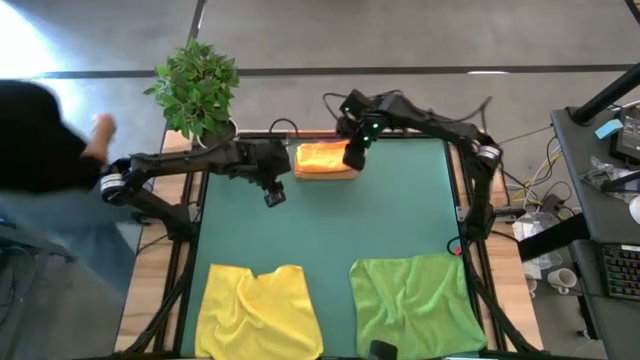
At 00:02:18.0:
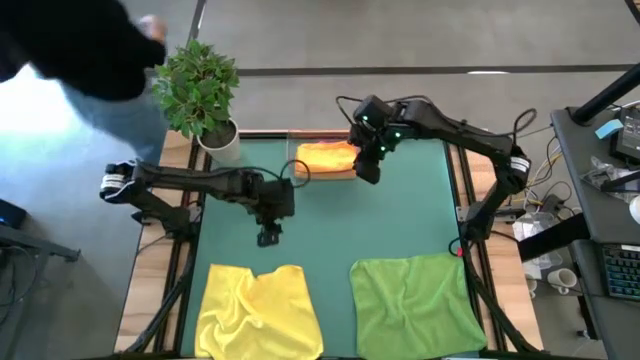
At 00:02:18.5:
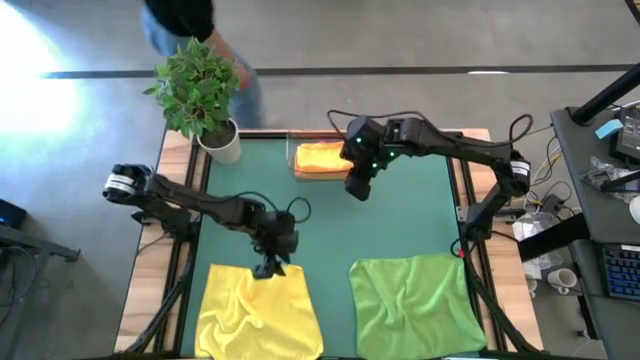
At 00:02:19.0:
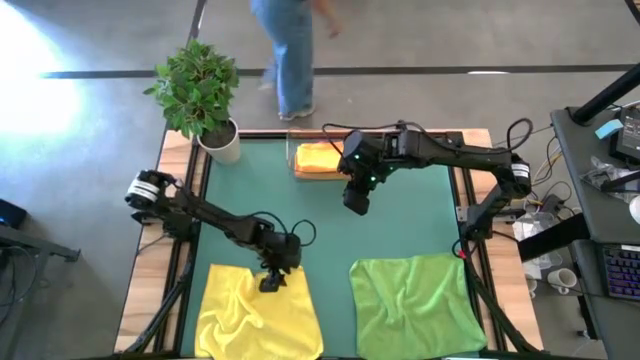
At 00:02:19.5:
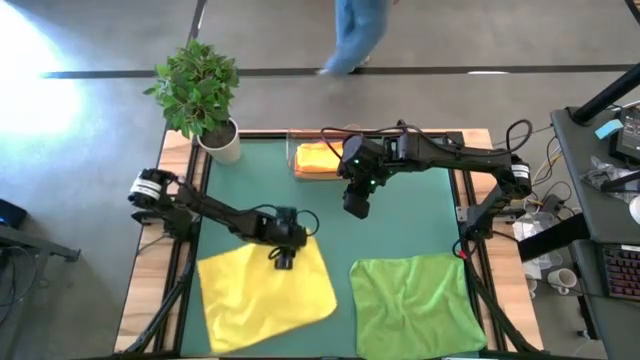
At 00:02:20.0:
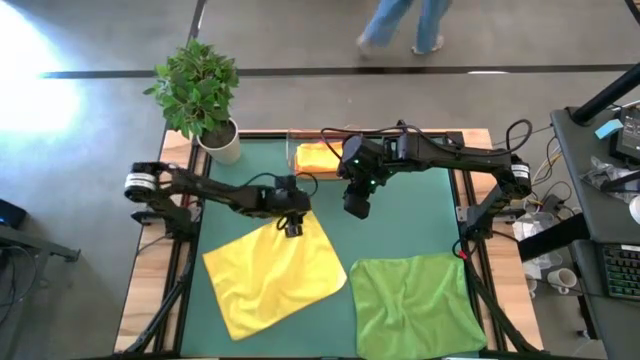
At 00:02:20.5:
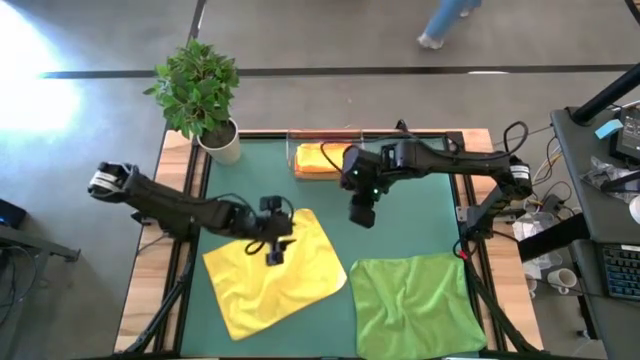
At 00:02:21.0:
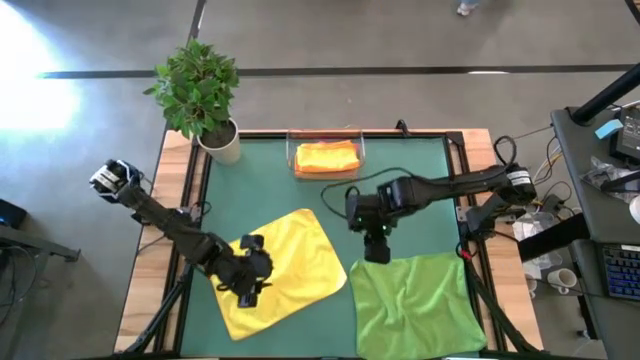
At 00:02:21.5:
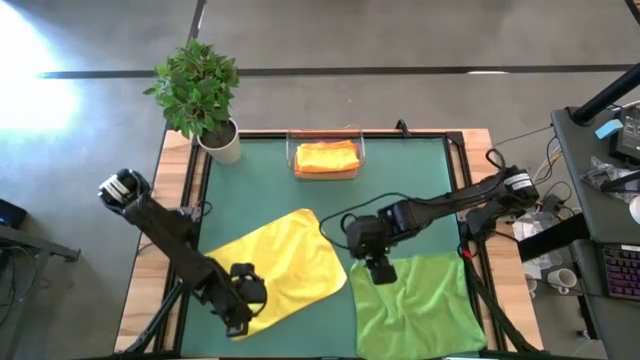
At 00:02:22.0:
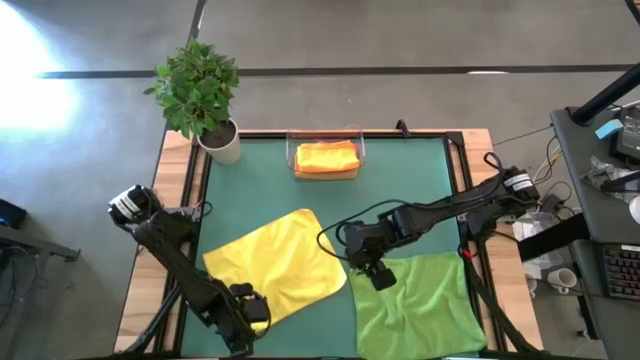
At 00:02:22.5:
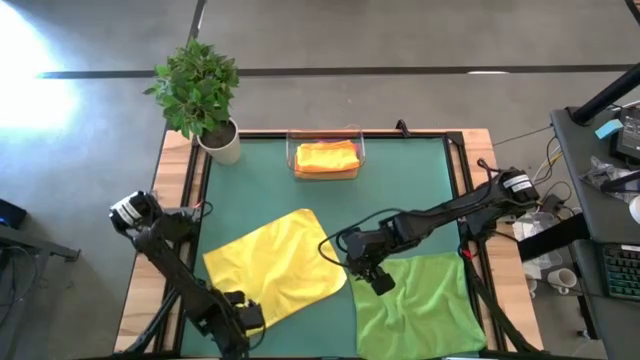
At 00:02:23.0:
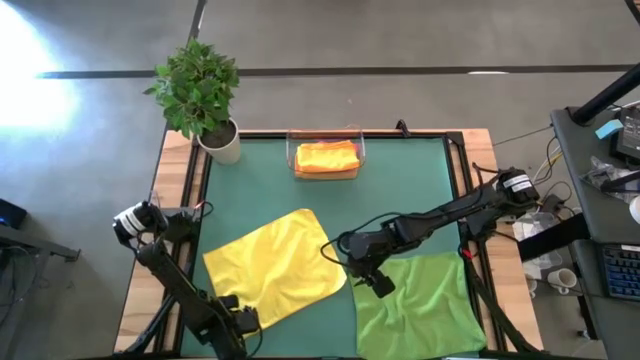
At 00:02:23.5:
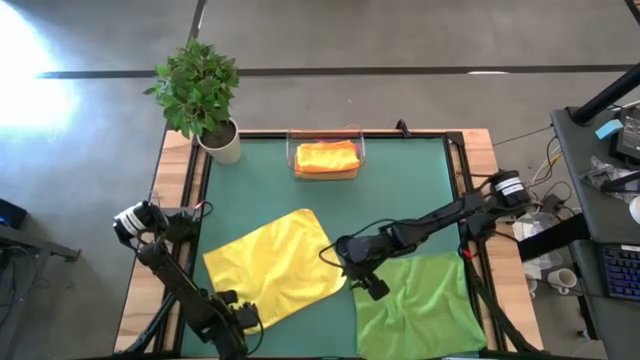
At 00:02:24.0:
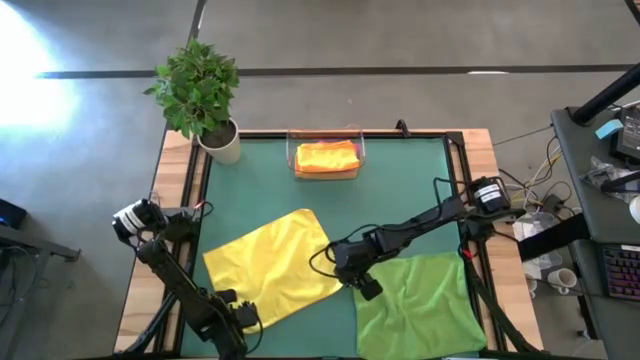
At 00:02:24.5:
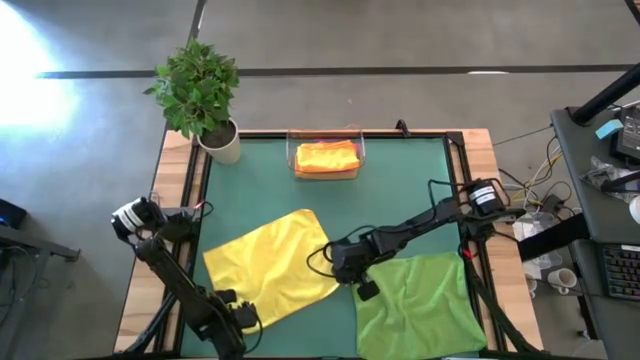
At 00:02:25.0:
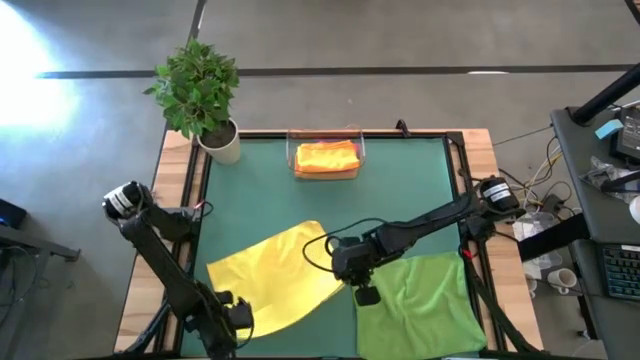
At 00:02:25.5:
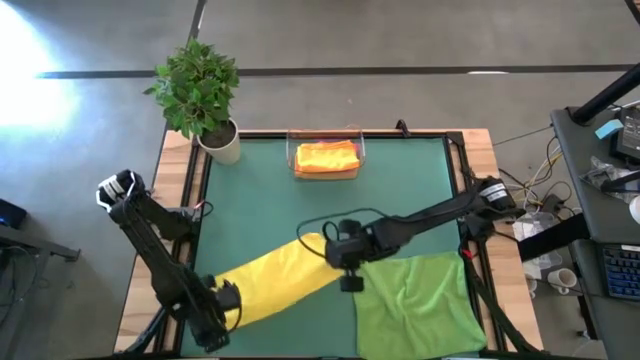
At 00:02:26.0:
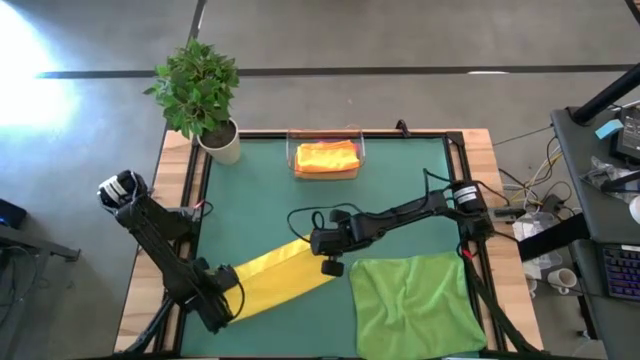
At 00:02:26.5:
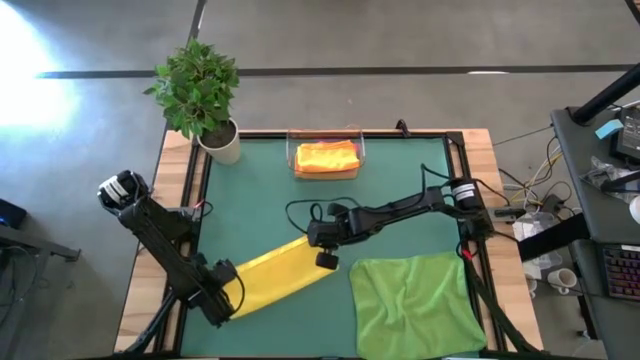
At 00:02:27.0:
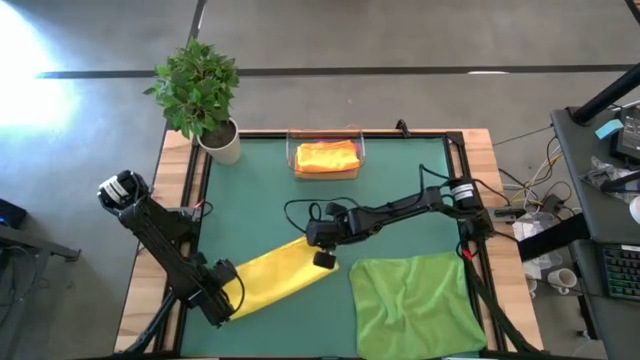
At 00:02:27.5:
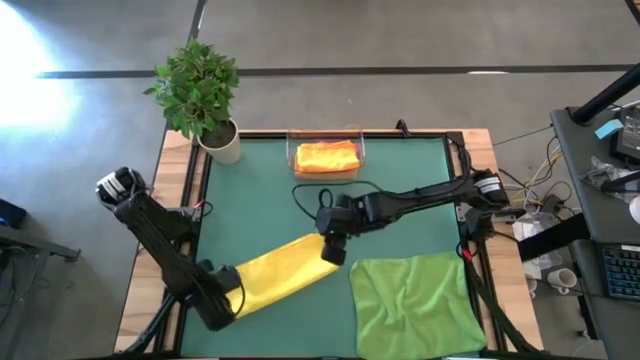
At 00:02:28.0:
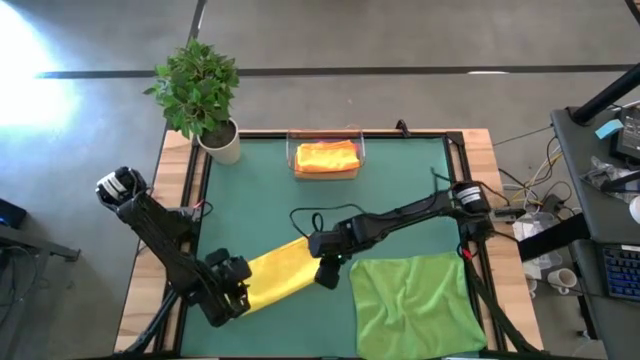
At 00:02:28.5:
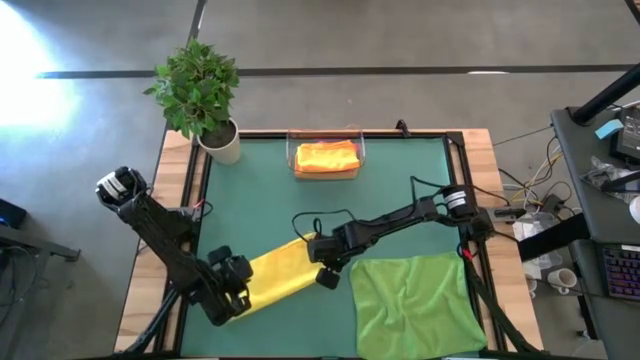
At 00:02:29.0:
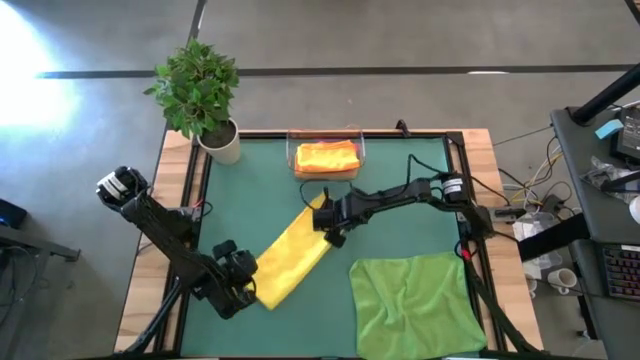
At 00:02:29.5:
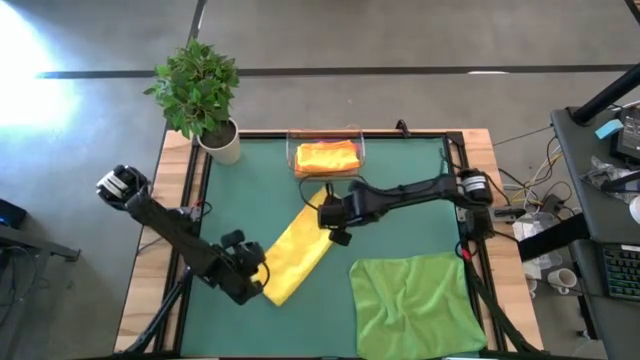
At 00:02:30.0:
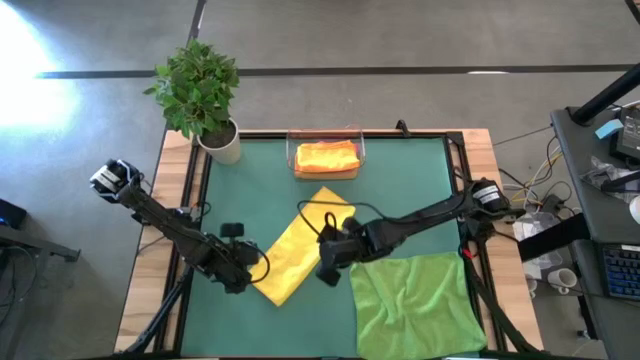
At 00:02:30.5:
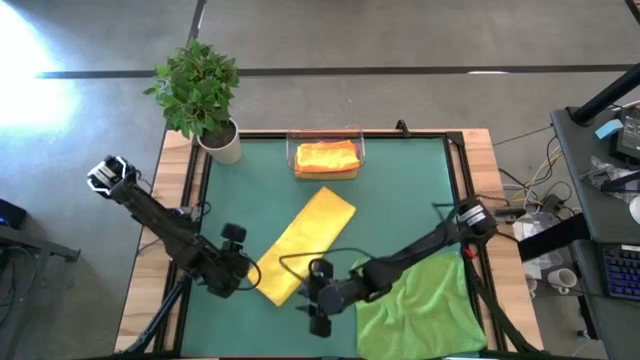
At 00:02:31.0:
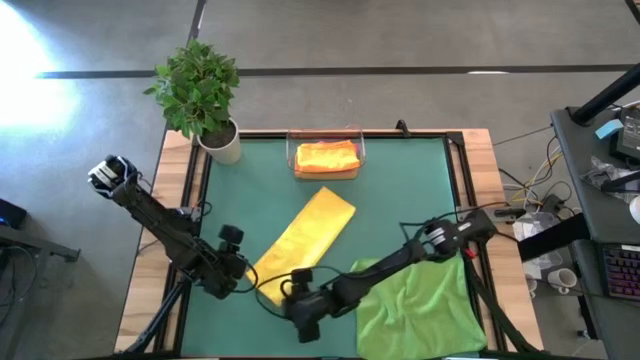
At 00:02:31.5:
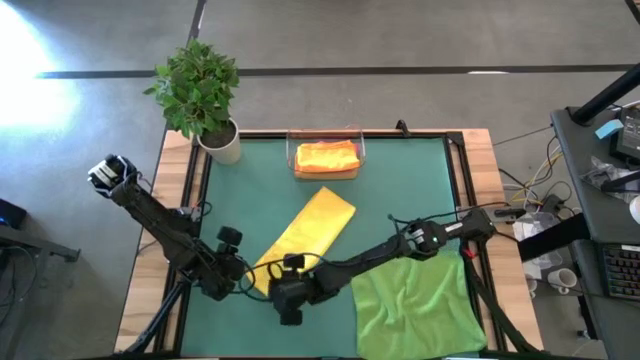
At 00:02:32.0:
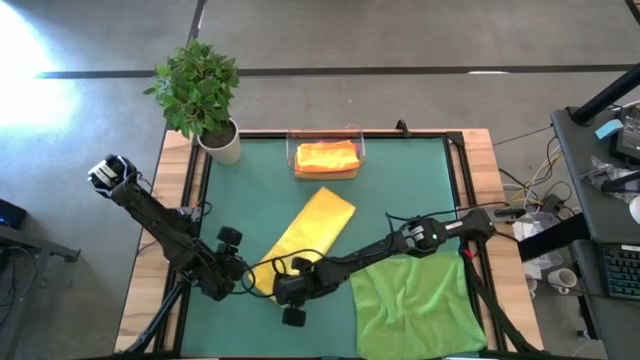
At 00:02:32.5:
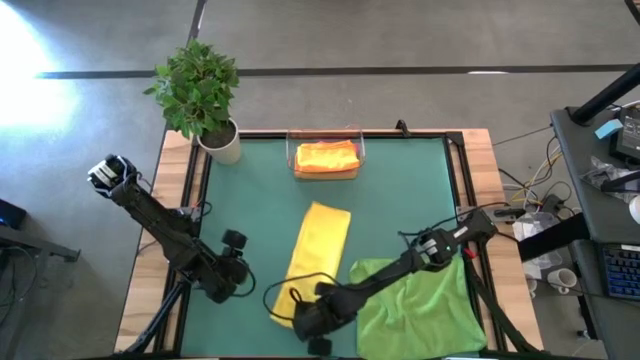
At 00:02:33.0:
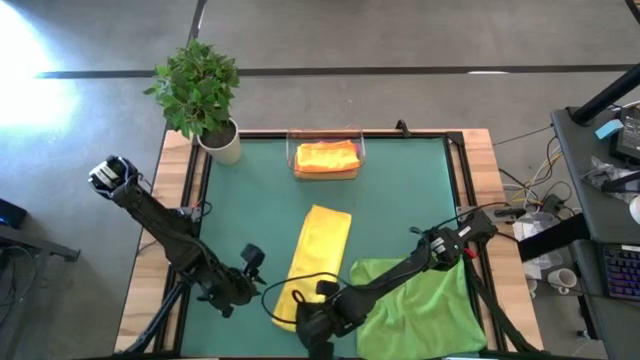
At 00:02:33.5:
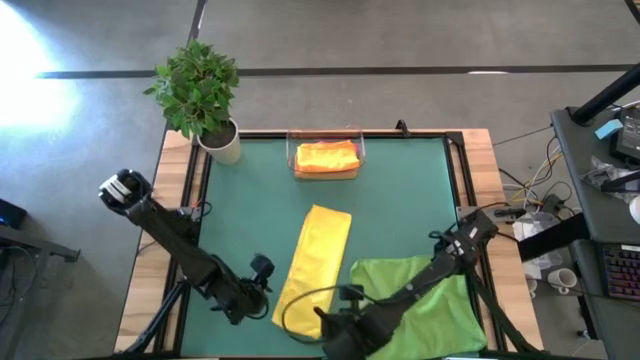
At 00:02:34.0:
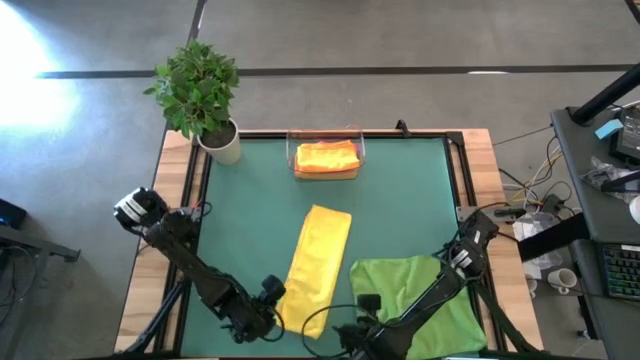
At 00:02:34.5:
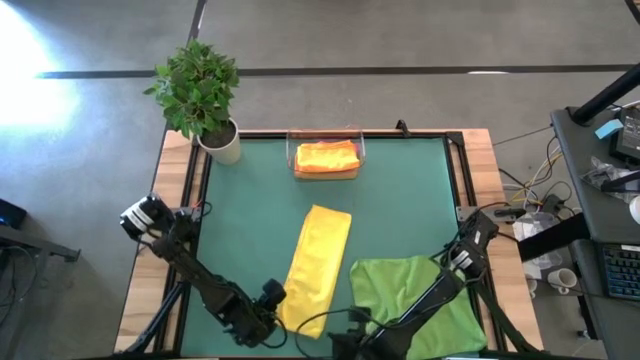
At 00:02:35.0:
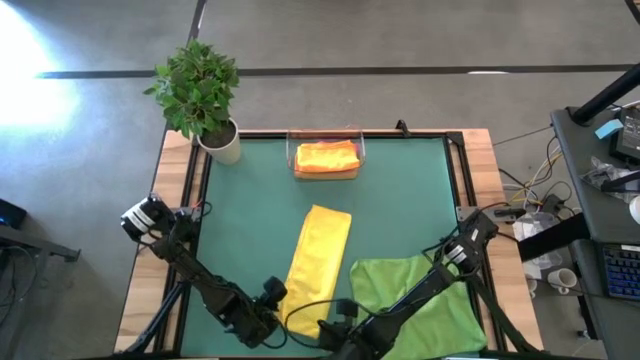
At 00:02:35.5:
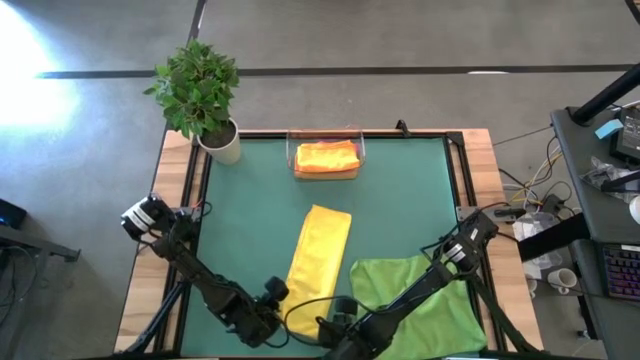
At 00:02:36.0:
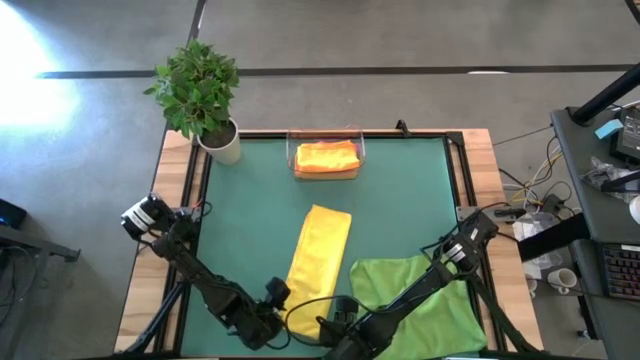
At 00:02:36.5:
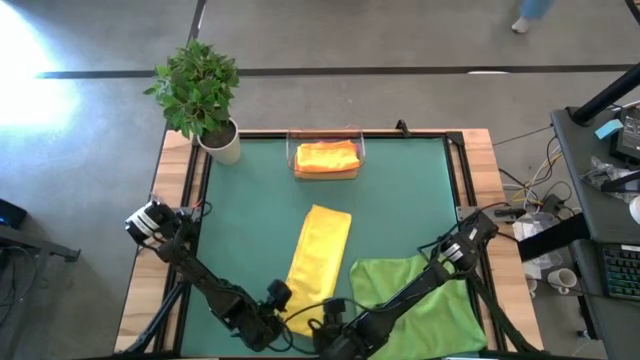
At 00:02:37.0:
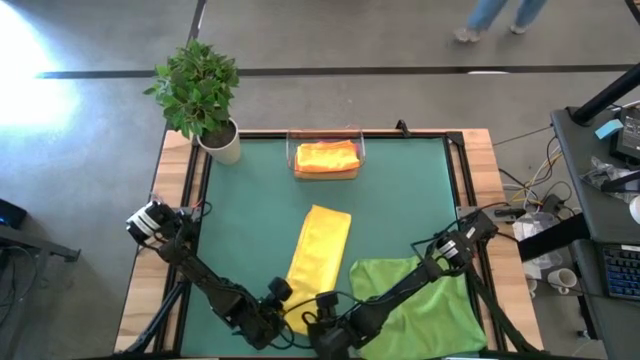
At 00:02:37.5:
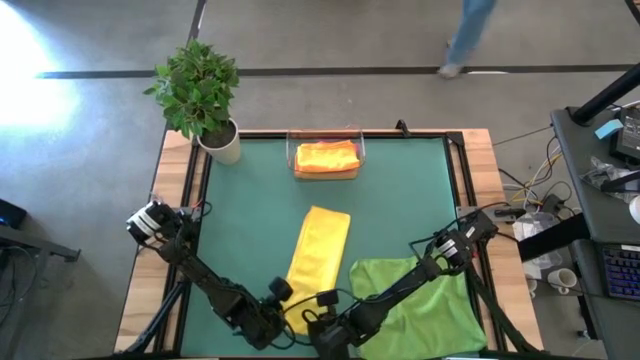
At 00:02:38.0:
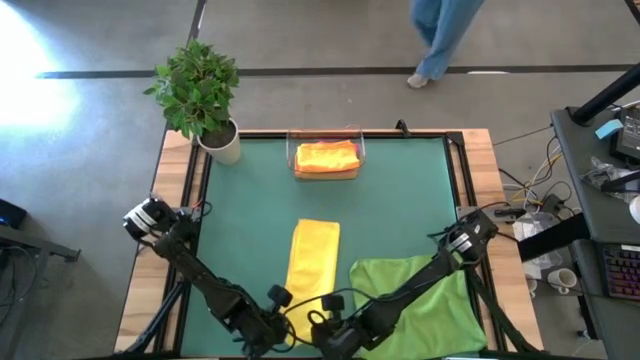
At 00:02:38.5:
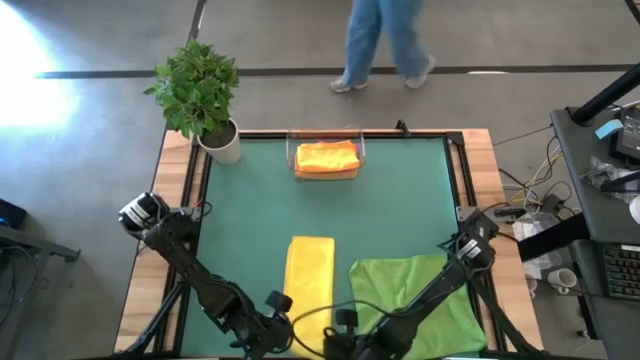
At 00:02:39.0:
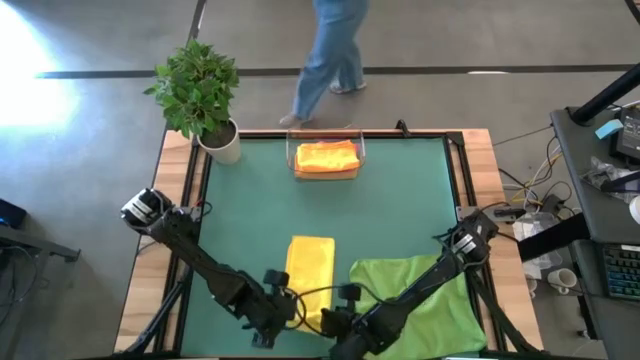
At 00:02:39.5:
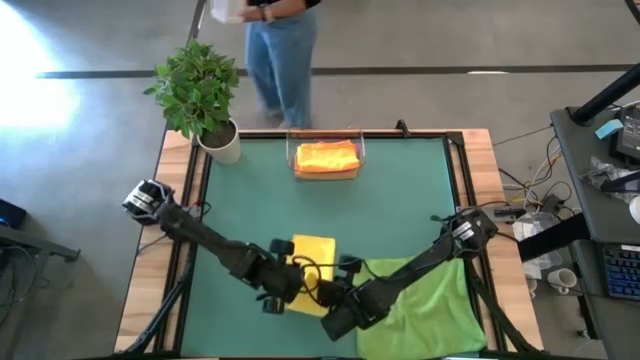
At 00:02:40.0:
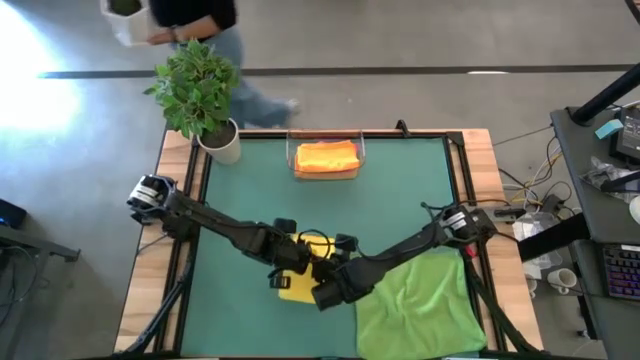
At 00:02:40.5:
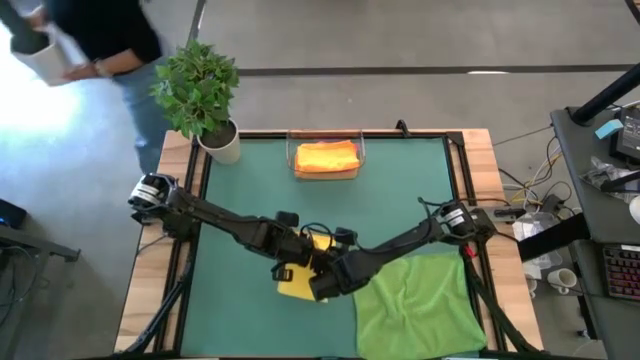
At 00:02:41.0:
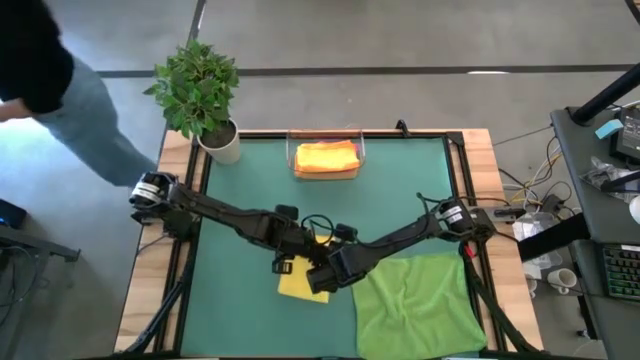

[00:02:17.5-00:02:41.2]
Task: Fold microfiber towels
Fold the yellow microfiber cloth
